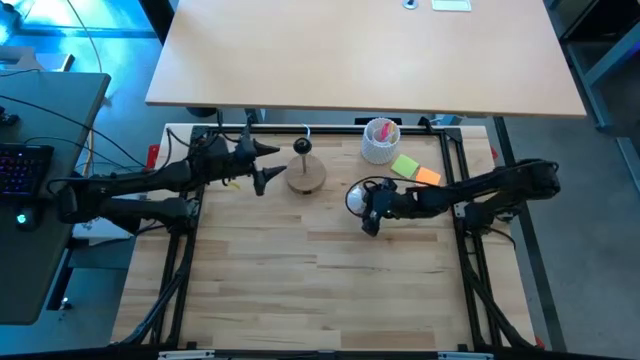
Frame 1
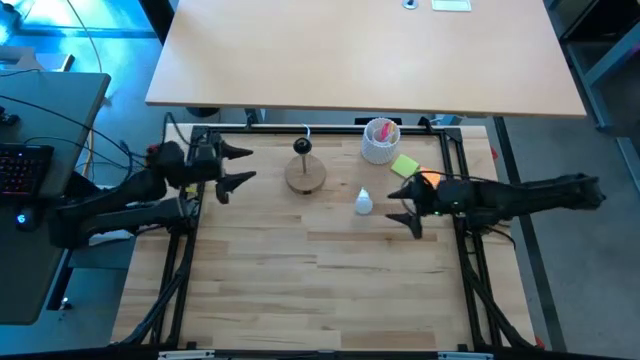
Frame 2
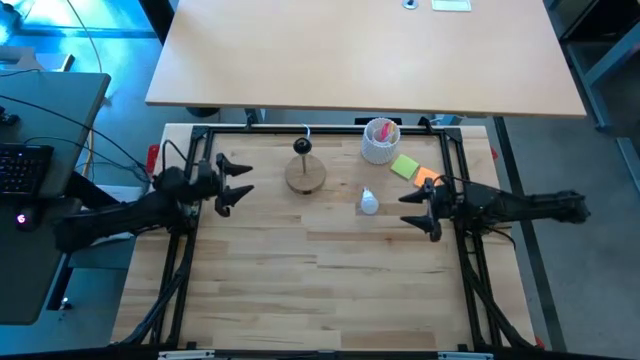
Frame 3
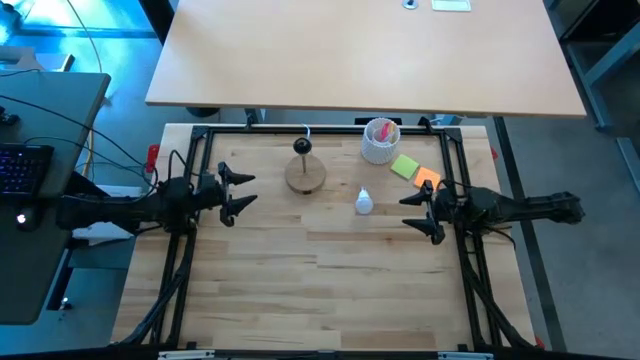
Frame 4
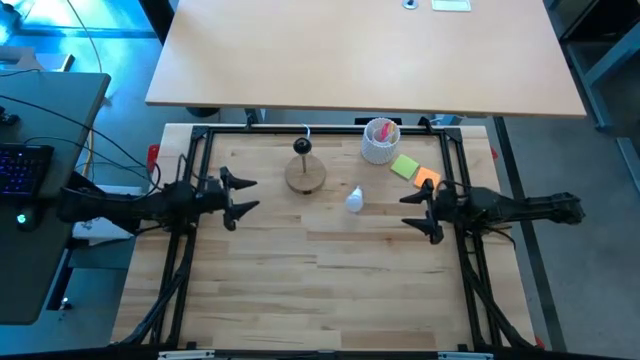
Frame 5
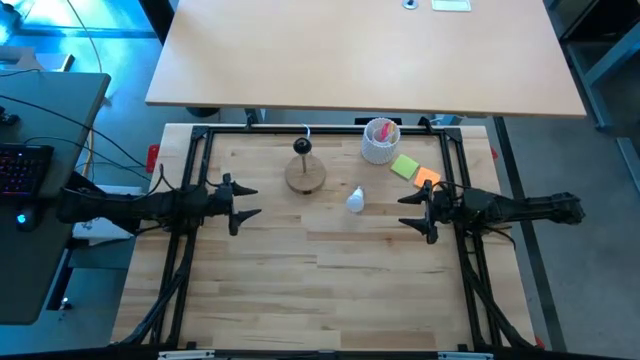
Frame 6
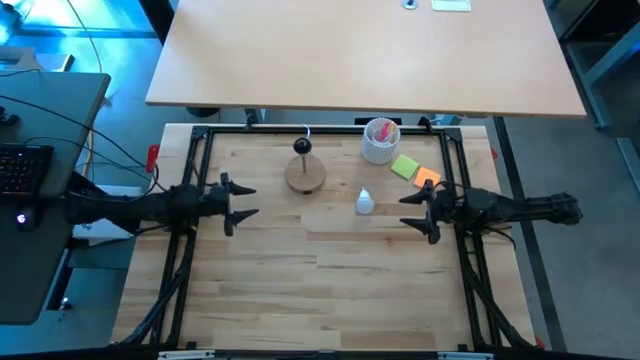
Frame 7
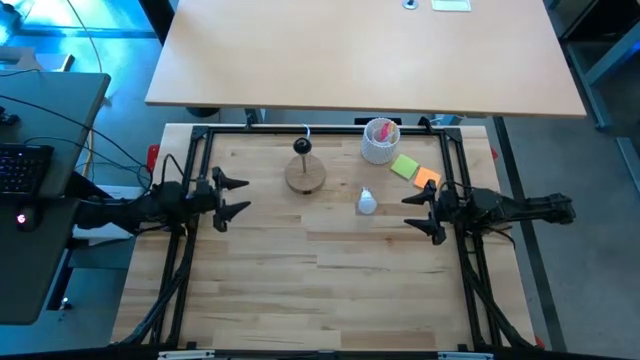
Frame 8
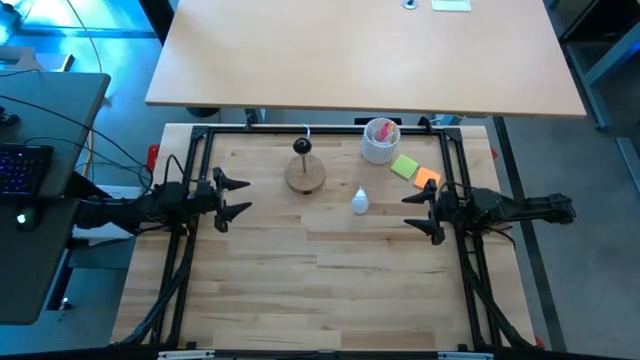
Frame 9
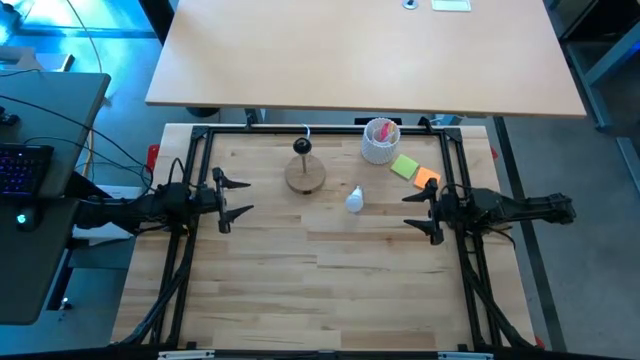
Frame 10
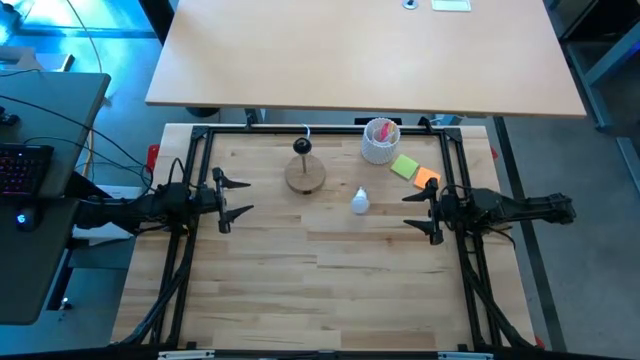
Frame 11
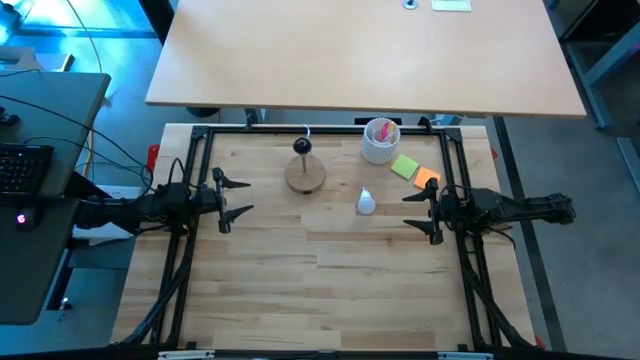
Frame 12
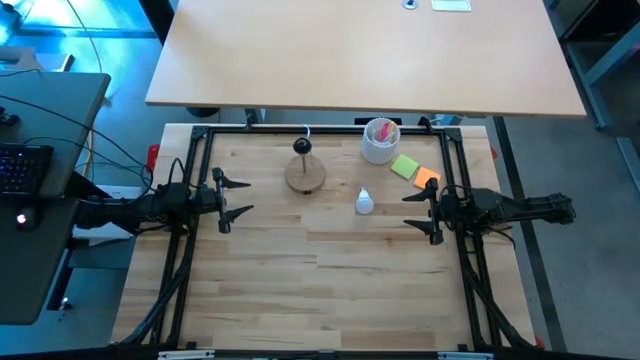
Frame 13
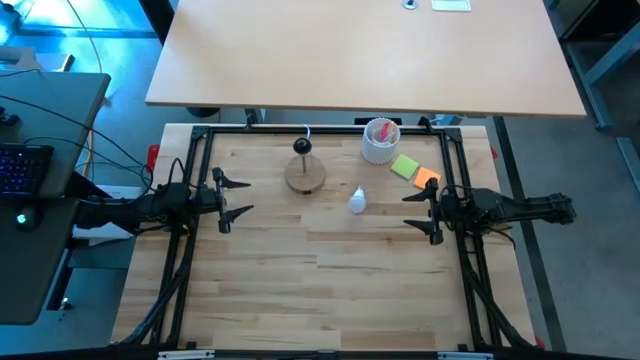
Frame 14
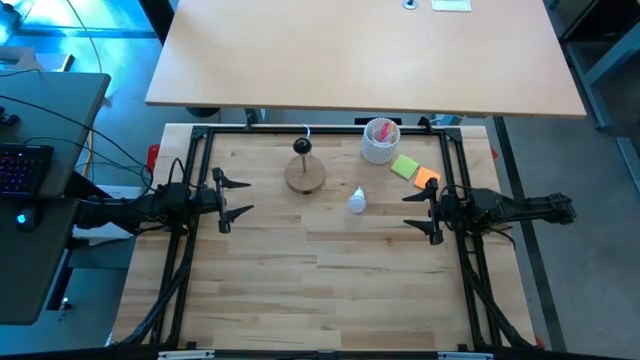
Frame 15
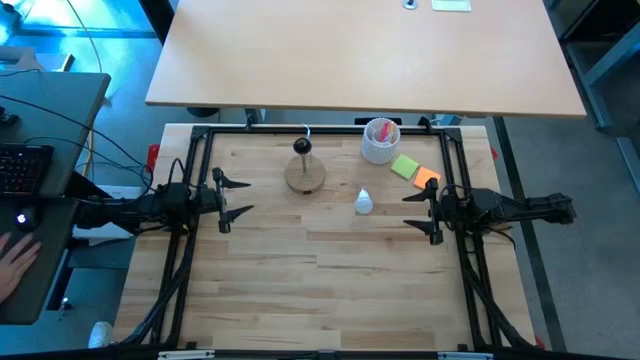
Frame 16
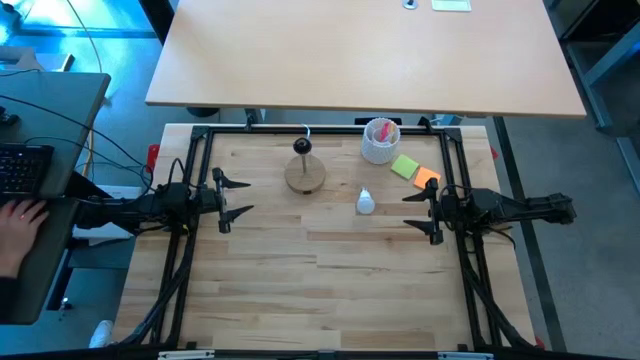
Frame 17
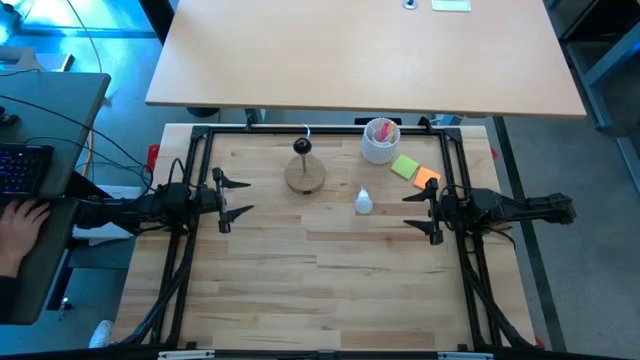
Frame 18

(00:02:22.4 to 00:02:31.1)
Task: Screw lightbulb
Return to Home Position

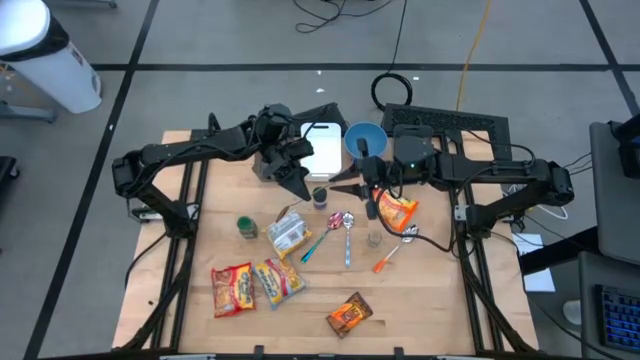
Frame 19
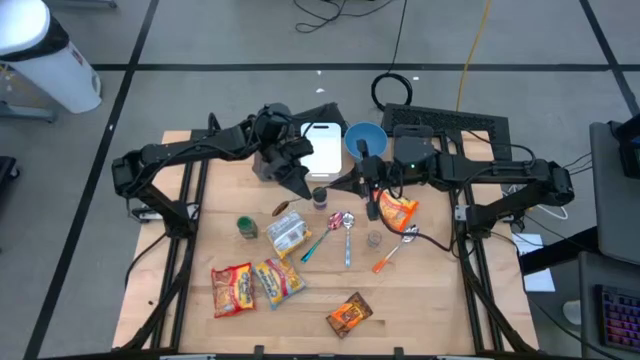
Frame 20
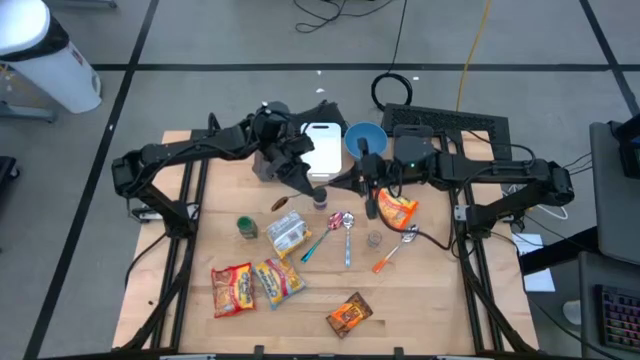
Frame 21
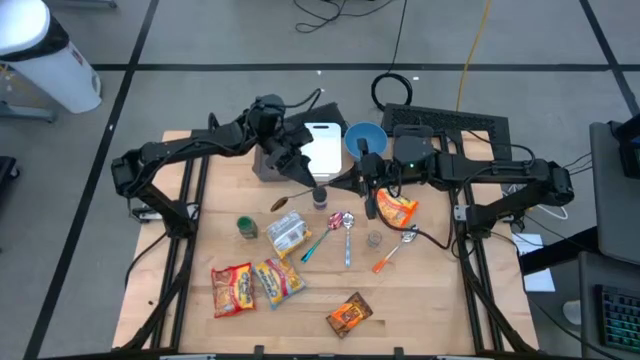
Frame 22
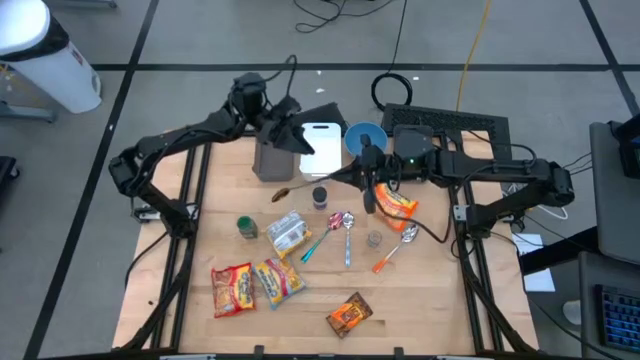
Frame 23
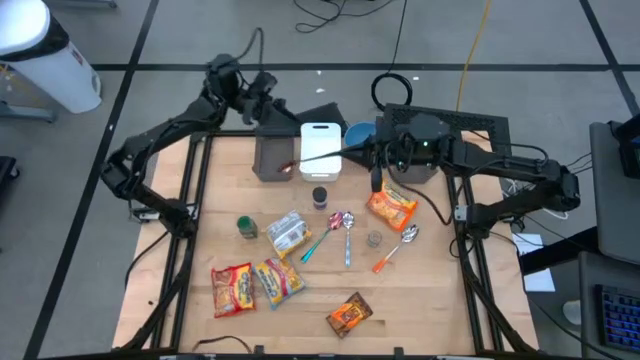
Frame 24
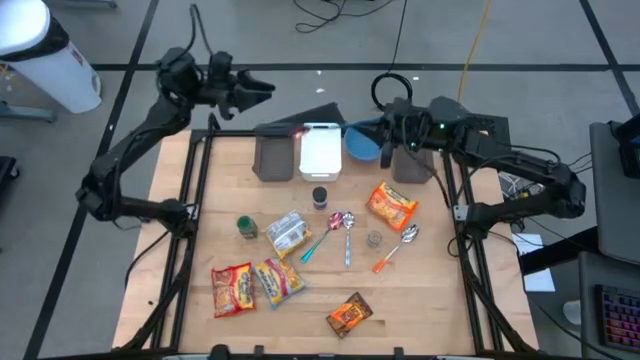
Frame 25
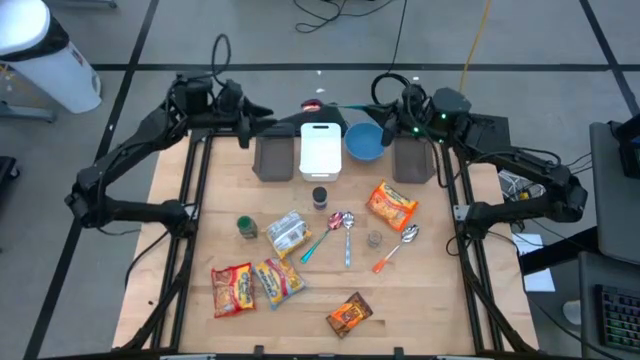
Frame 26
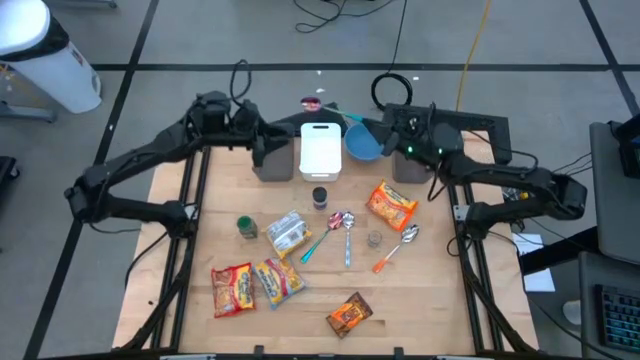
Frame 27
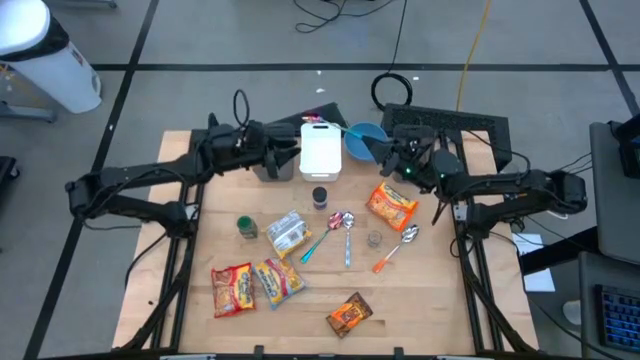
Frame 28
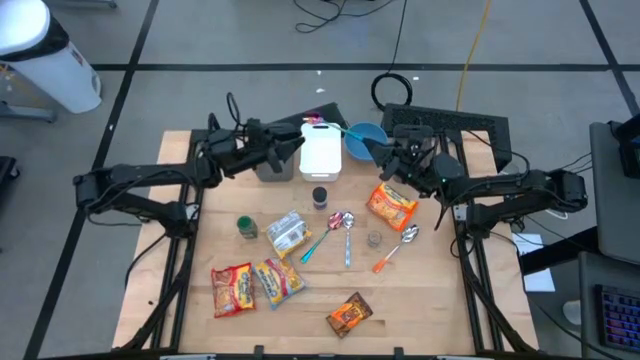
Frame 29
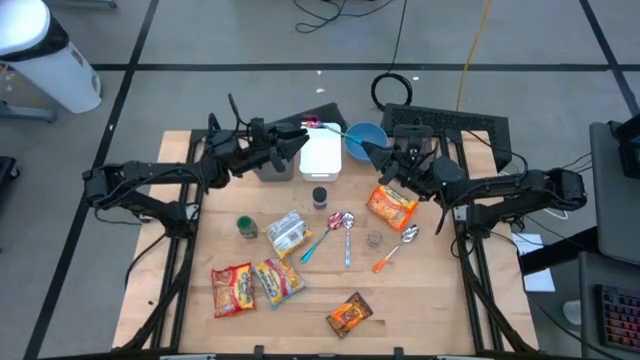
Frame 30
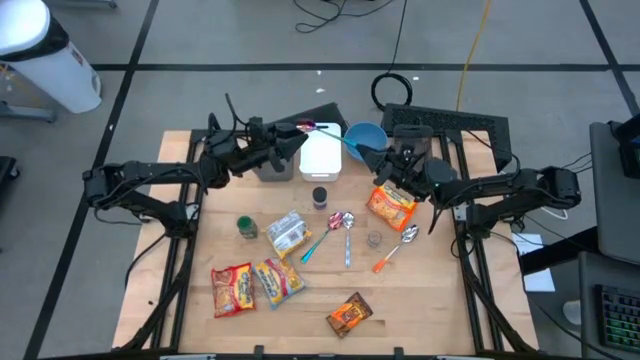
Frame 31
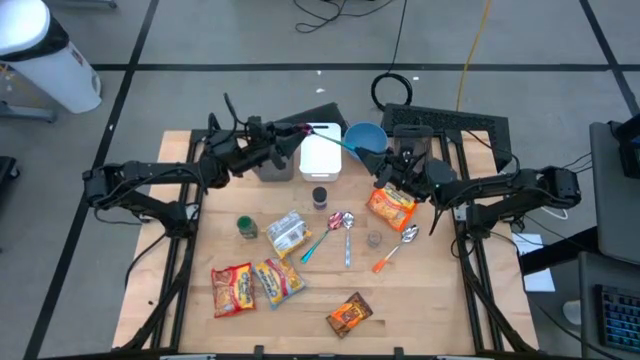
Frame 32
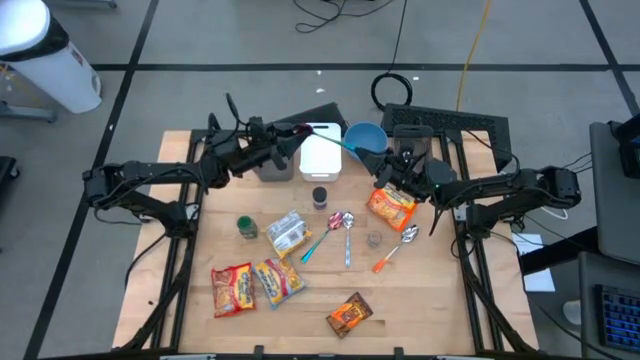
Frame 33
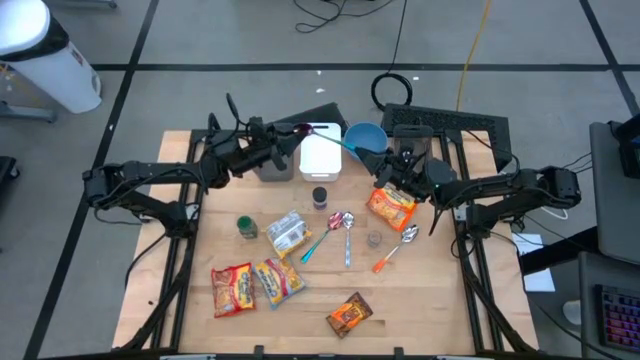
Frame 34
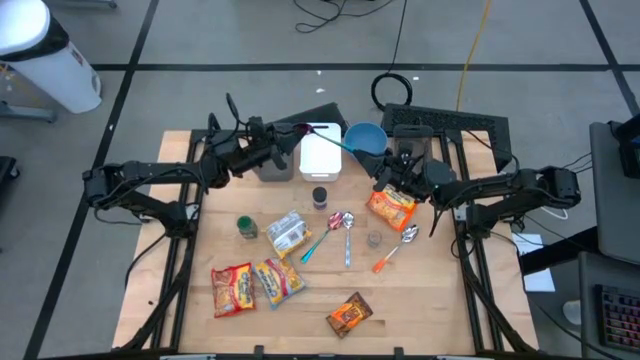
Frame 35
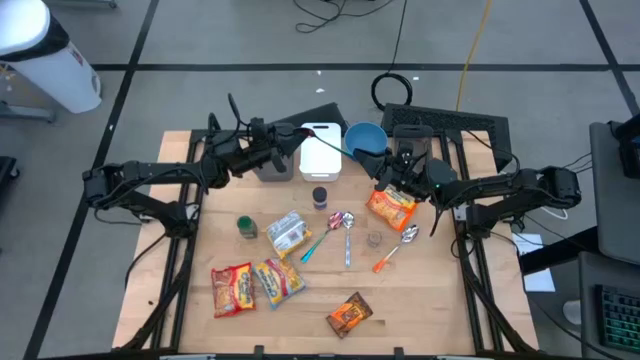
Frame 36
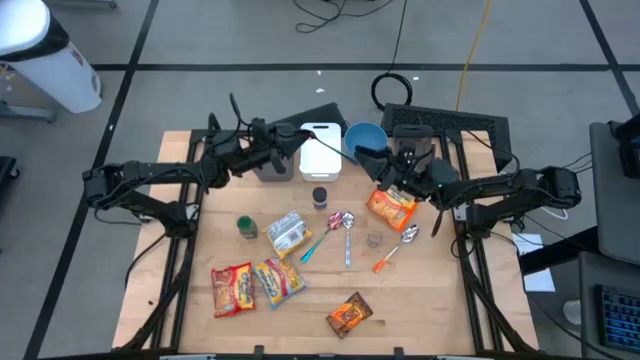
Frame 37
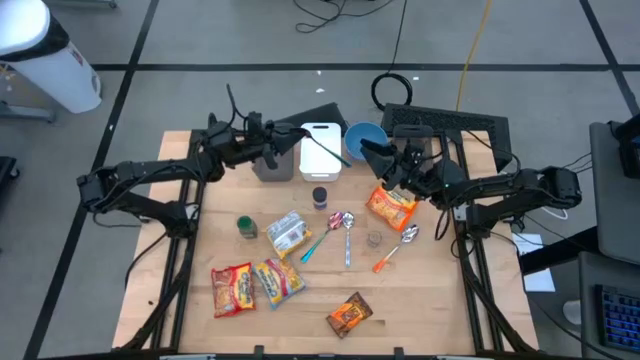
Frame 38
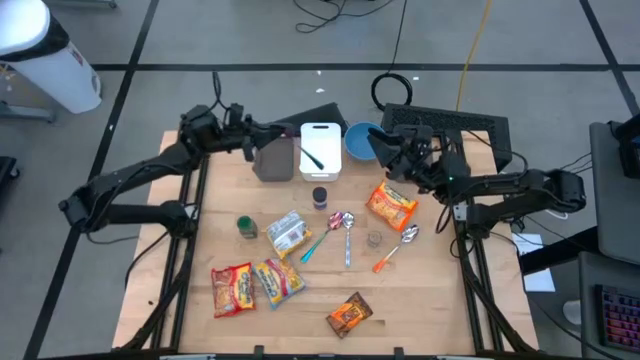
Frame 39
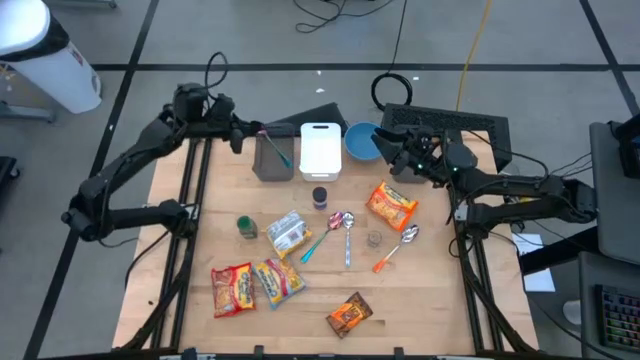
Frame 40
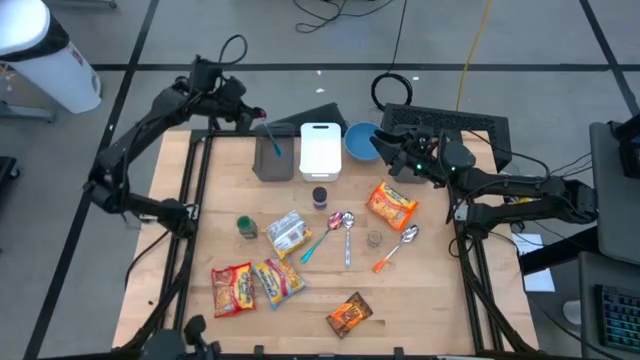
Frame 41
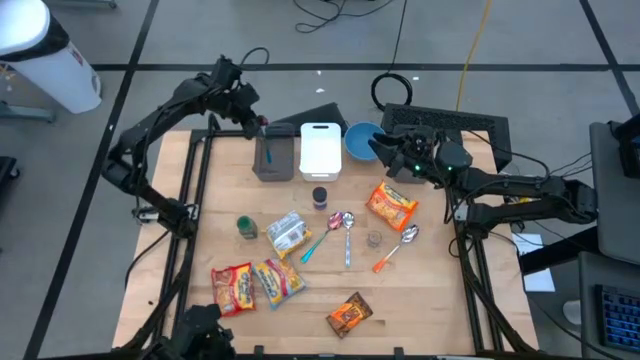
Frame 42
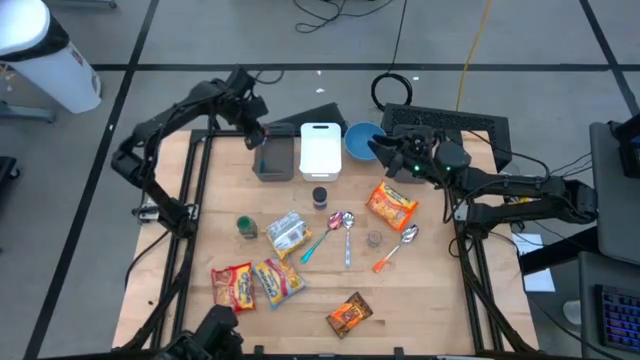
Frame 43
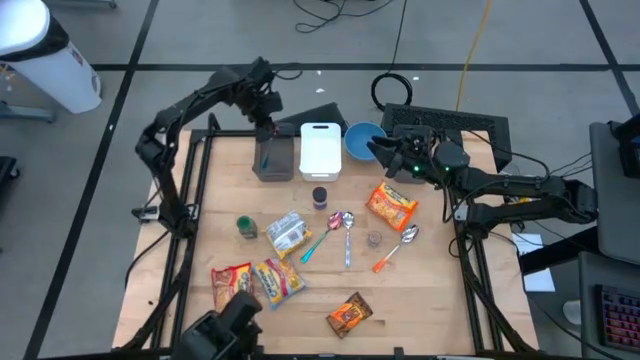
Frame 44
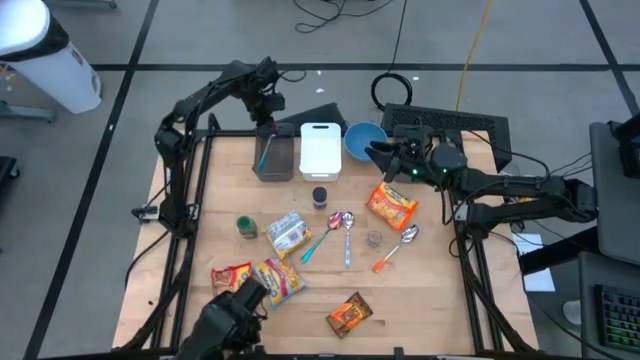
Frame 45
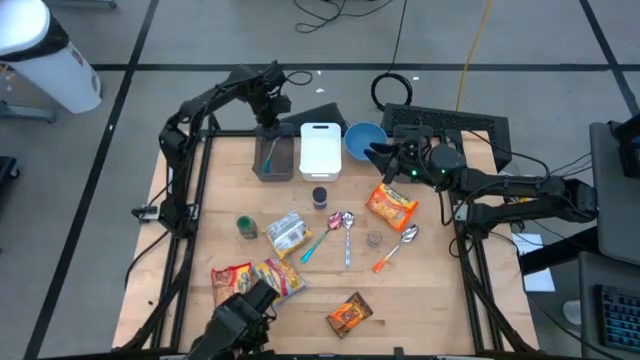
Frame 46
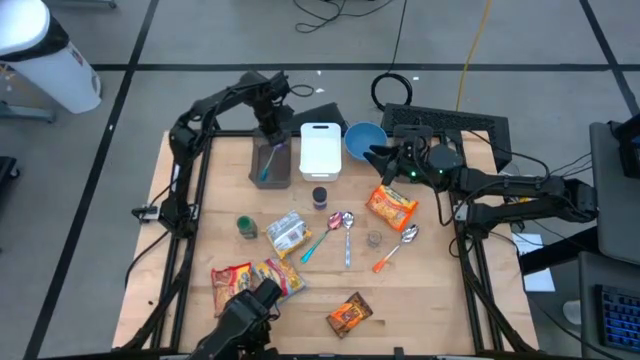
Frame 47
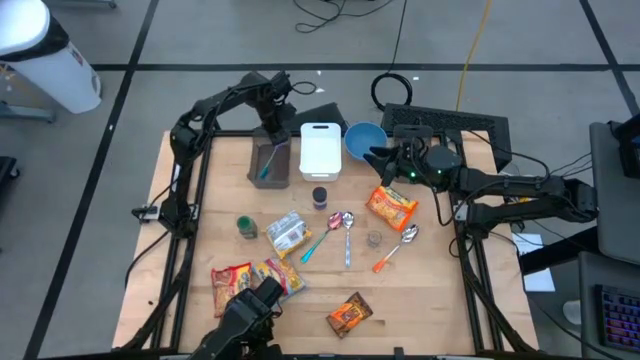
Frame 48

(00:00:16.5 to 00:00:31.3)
Task: Pick & Place Food Item
Put the left blue spoon into the left black bin
